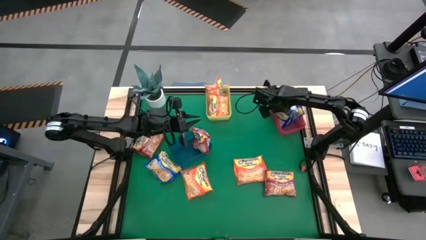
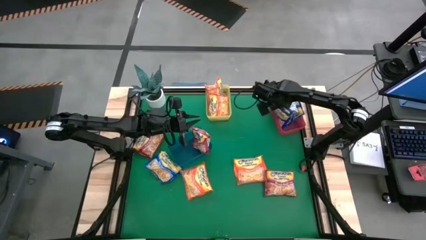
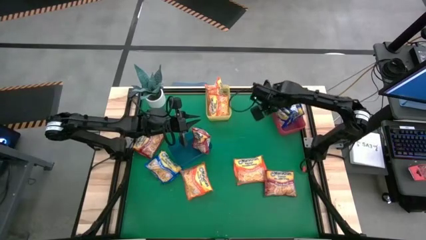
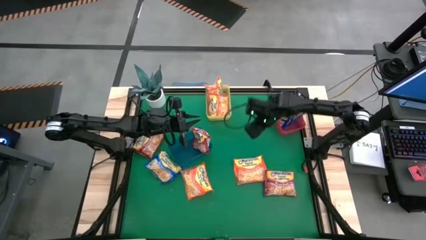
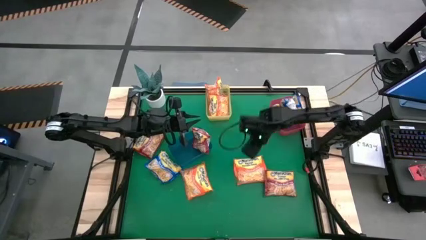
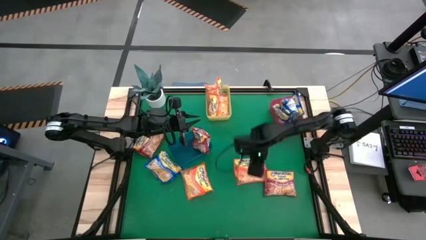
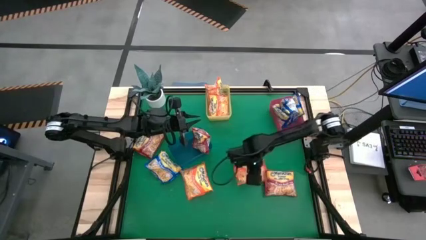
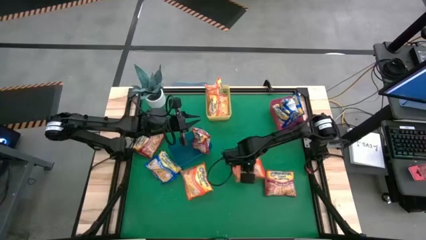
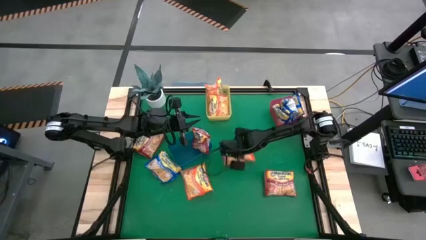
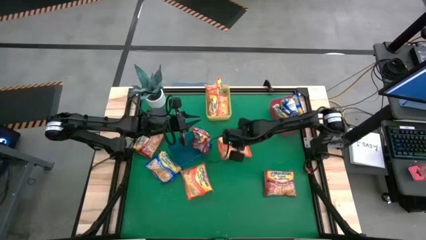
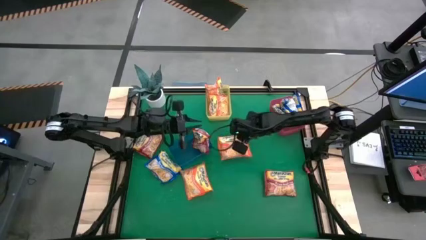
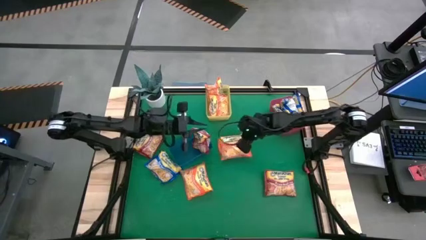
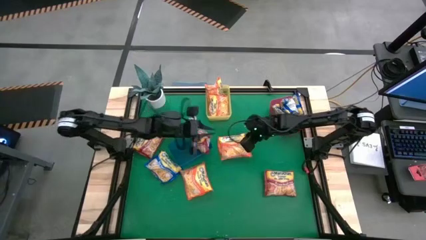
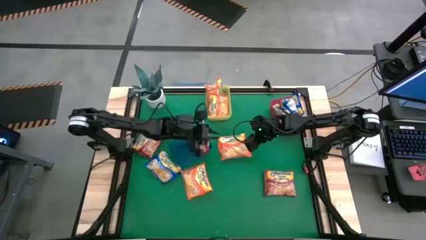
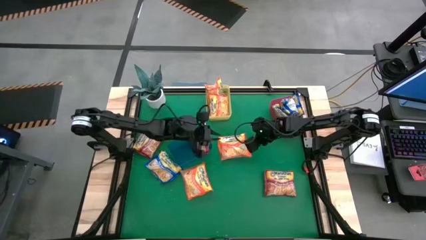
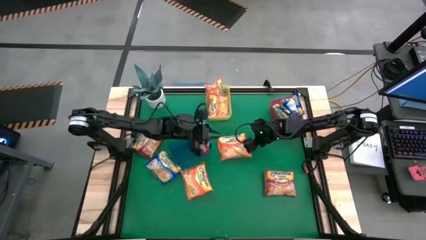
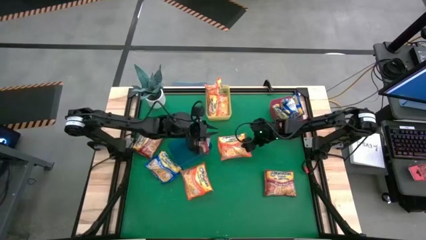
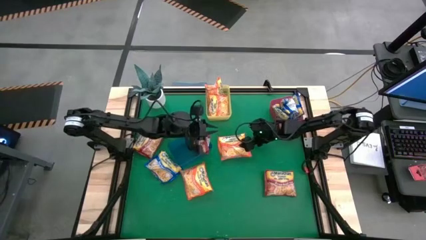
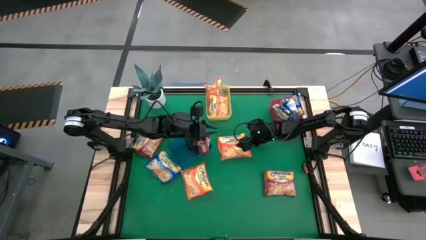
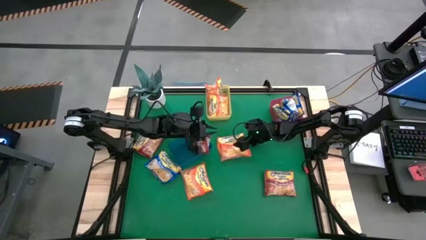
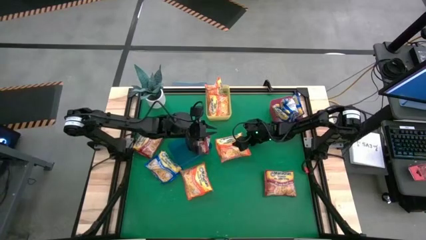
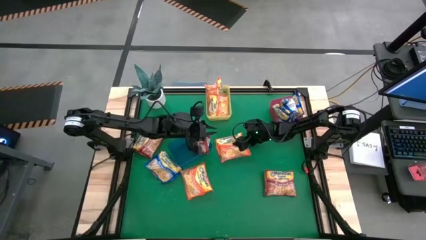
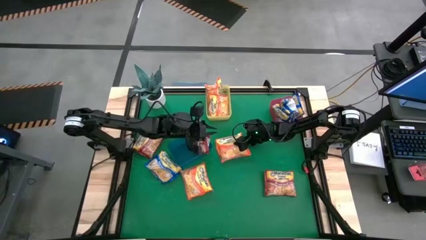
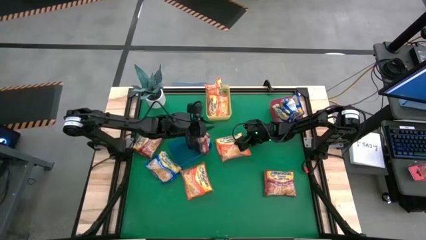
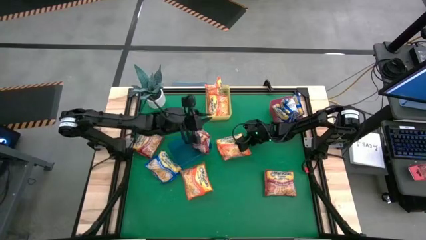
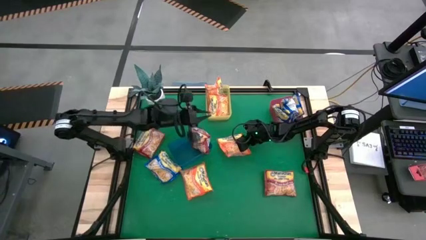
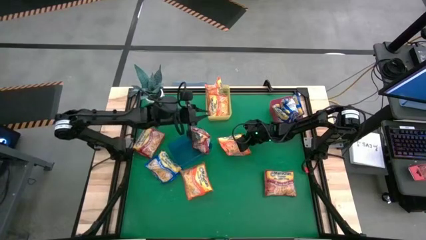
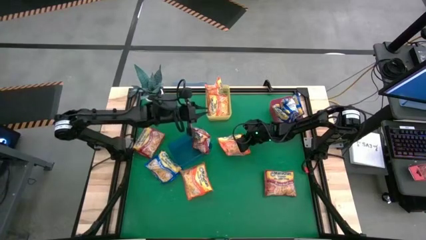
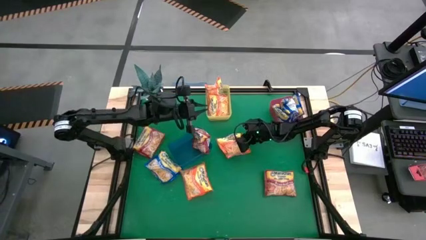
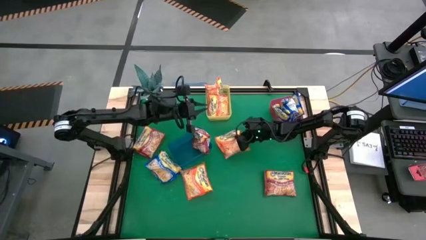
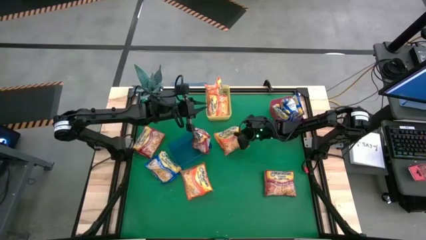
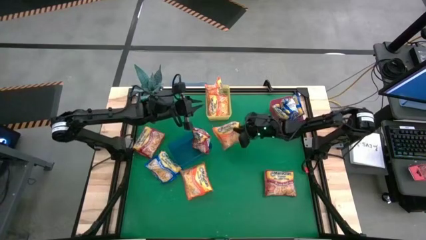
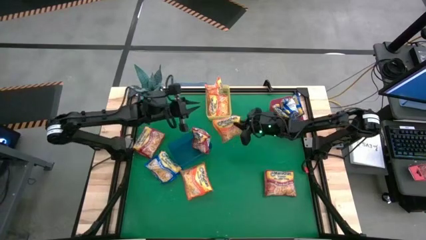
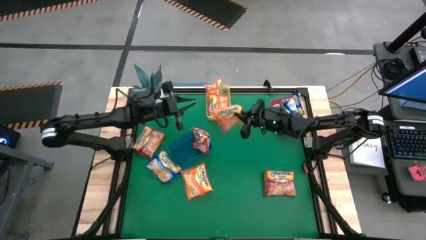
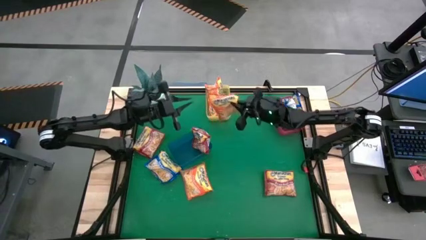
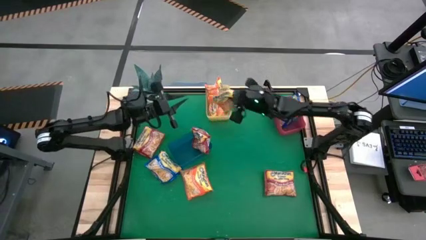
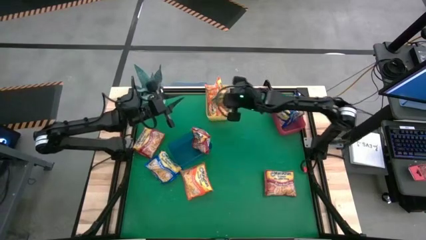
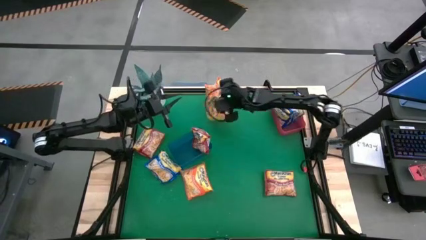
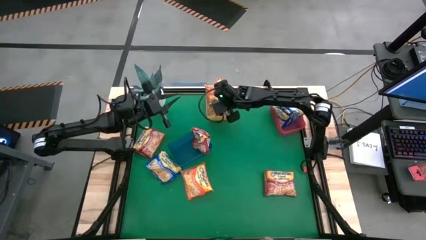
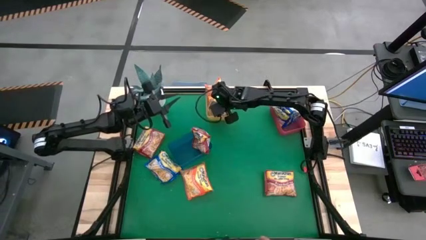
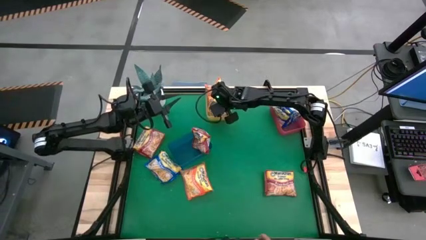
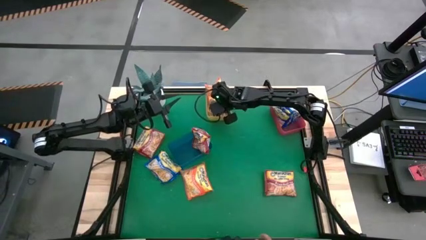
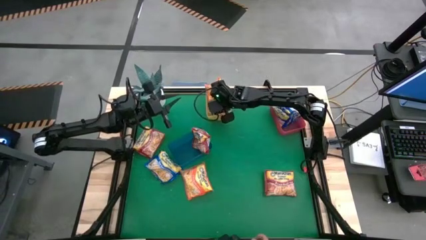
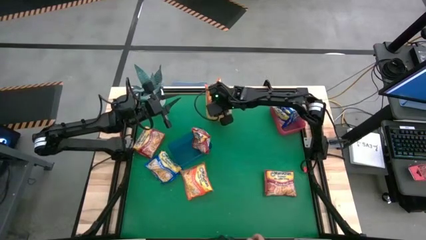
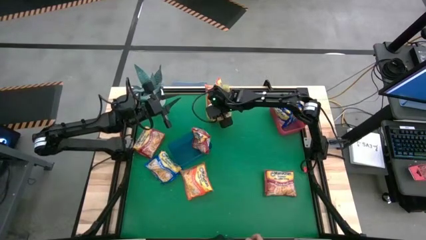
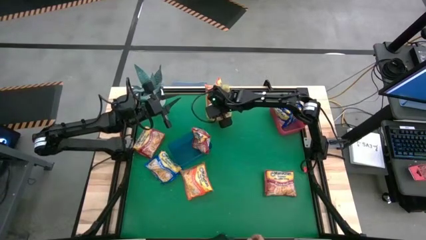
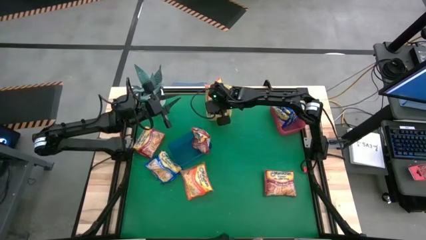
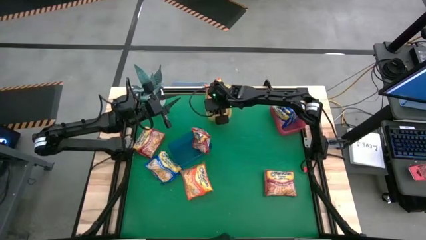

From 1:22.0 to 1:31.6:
Task: Sort Maruchan noodles
Put the orange noodle pack into the yellow bin

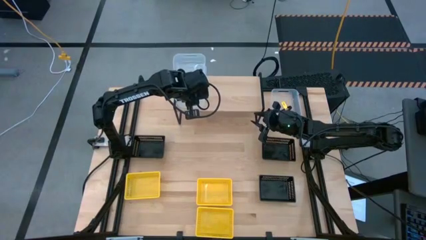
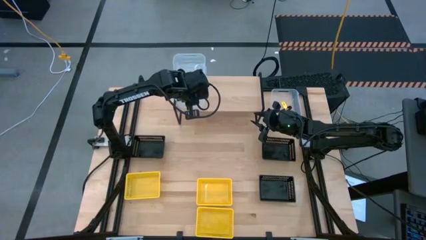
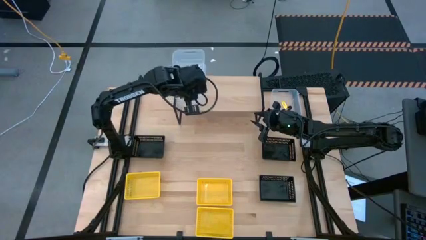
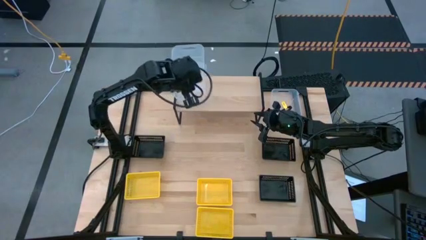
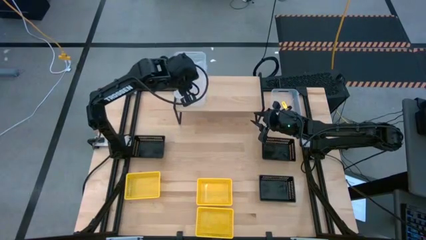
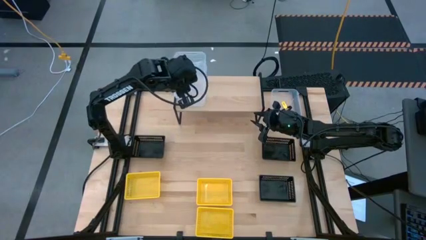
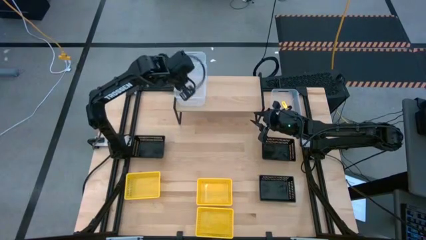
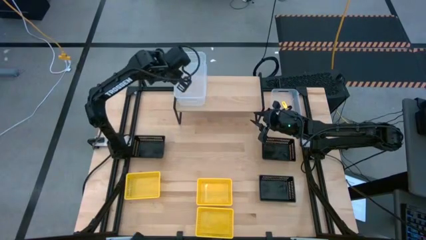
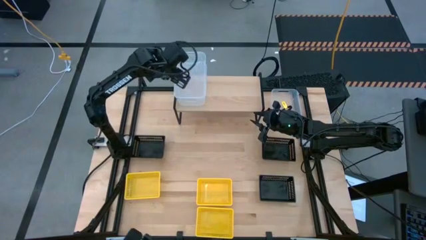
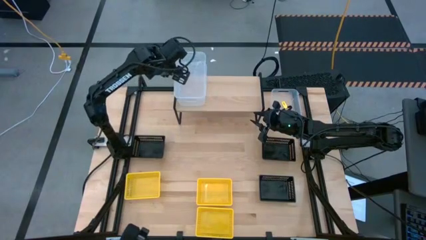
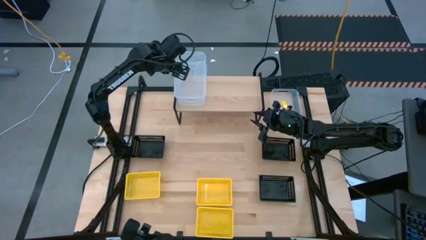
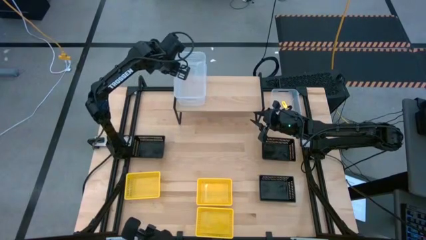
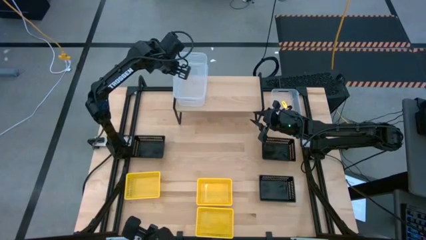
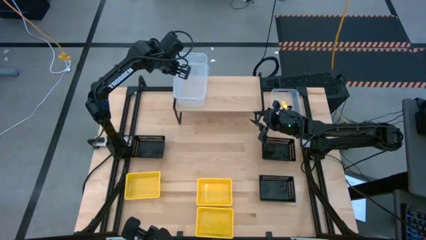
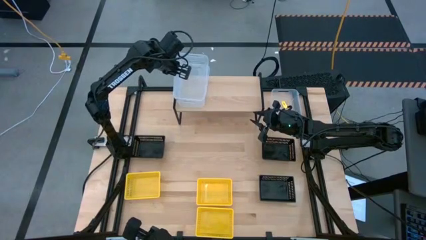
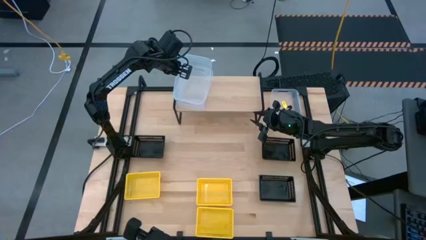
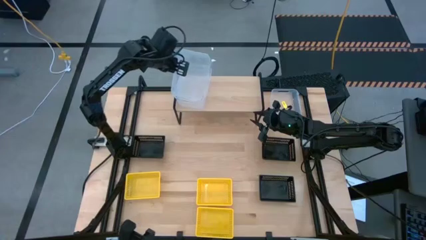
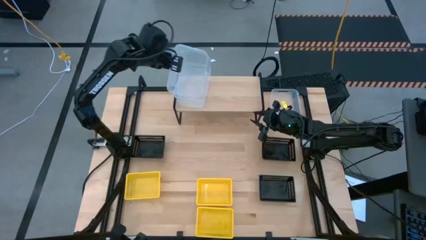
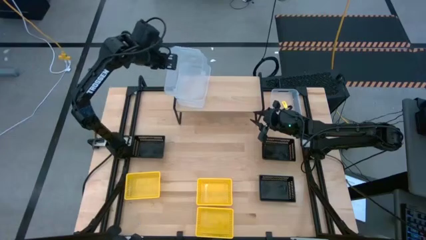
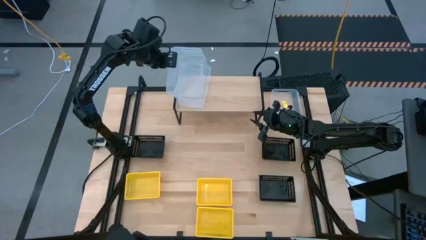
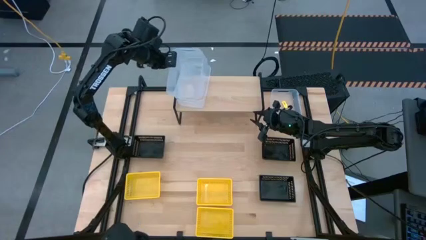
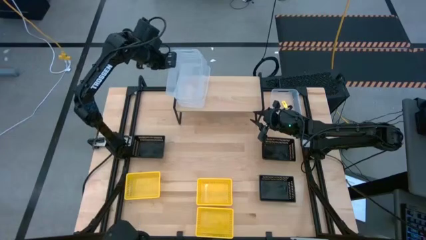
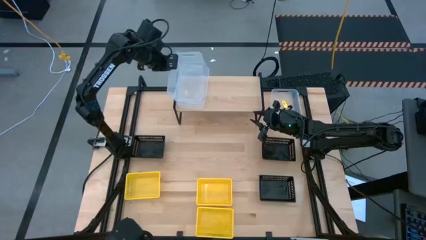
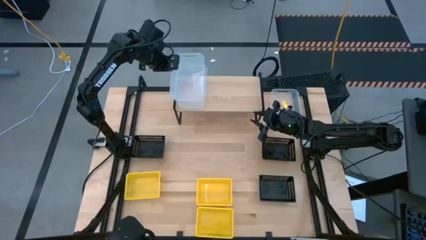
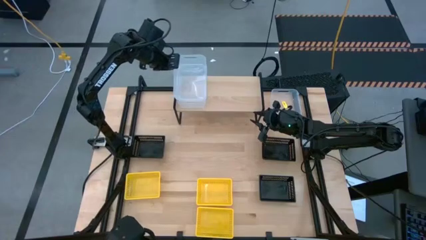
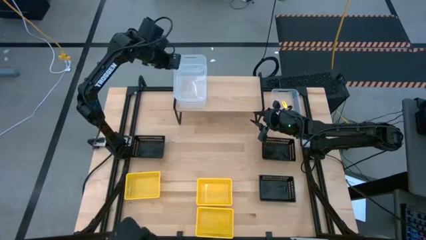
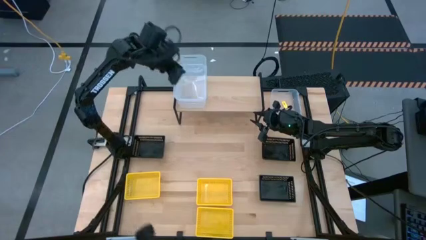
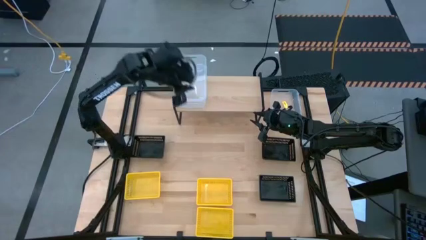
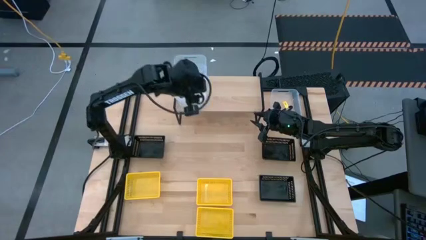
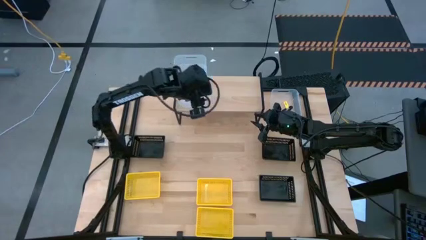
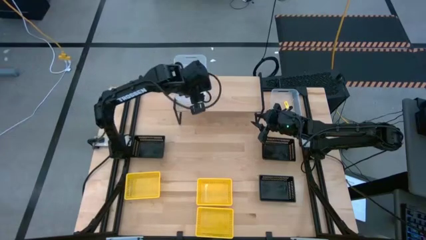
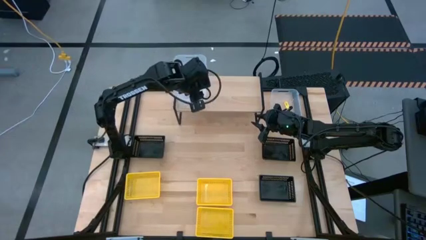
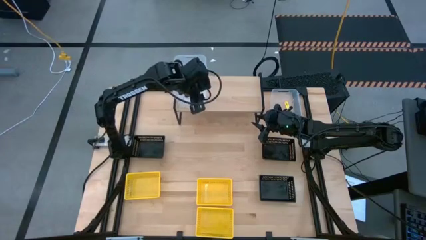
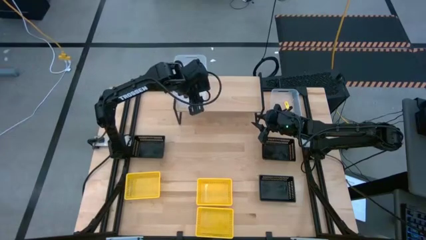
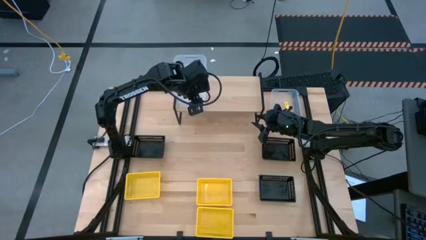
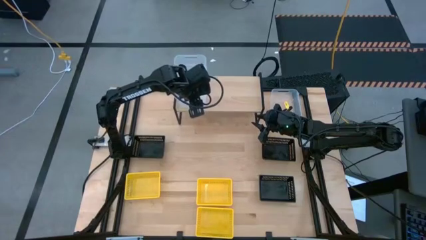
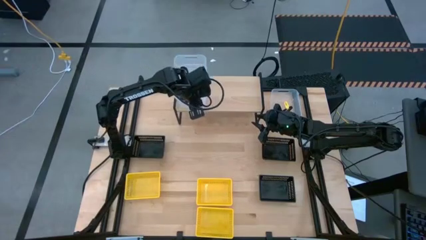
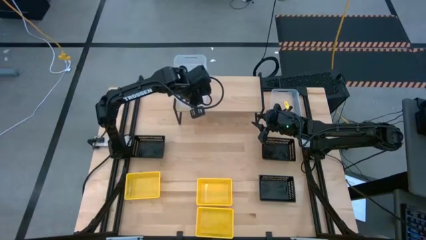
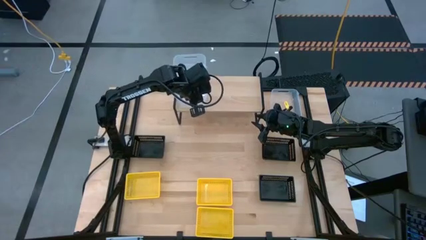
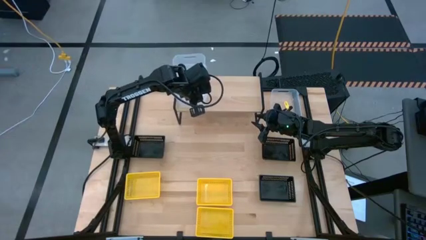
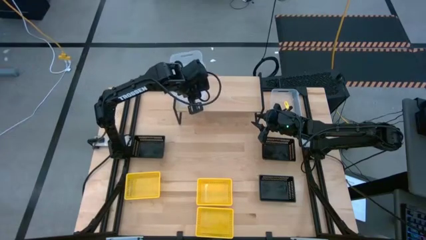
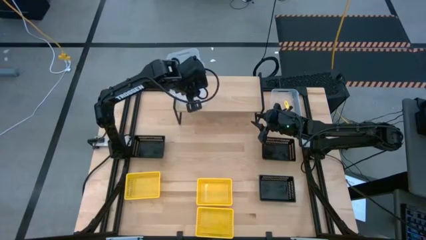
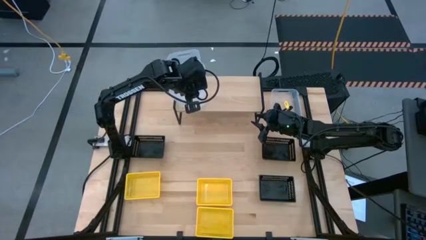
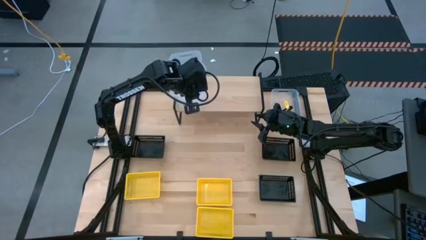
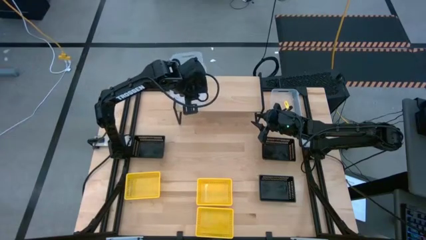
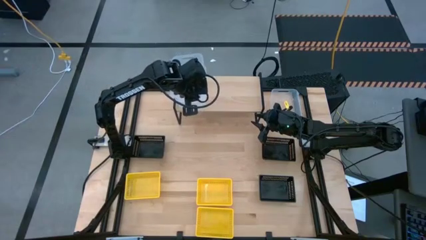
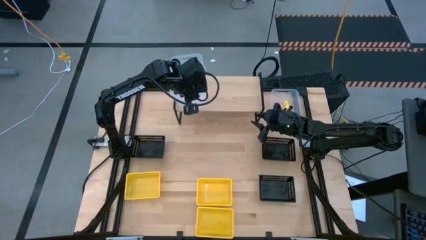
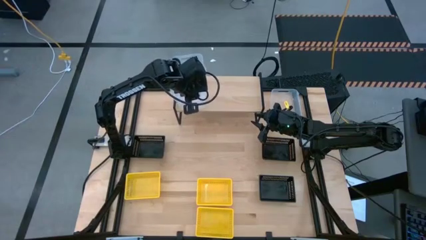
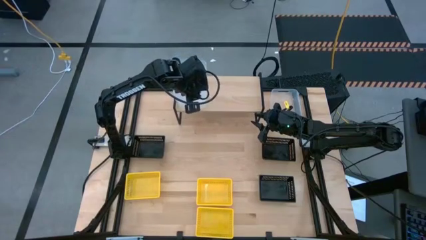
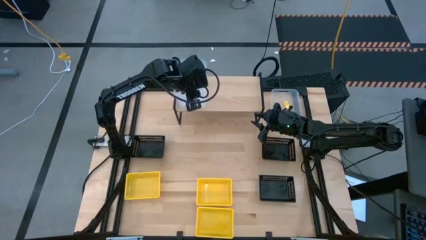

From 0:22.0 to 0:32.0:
Task: Stack baskets on shelf by color
Stack the middle transparent bin on top of the transparent bin on the shelf
